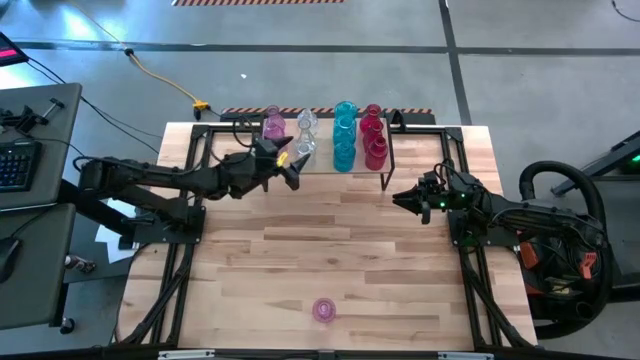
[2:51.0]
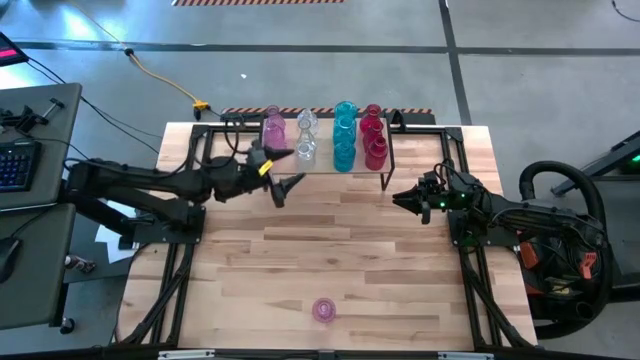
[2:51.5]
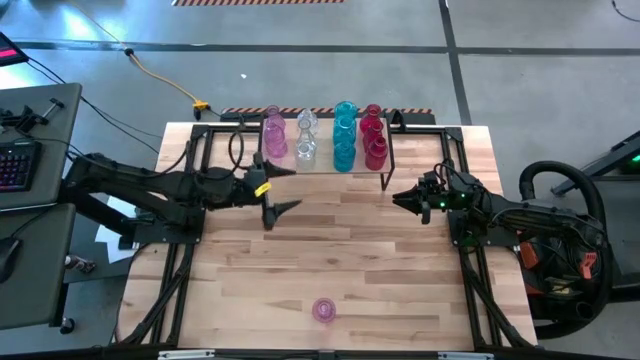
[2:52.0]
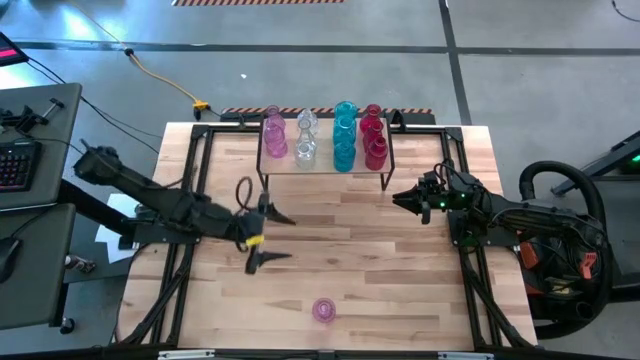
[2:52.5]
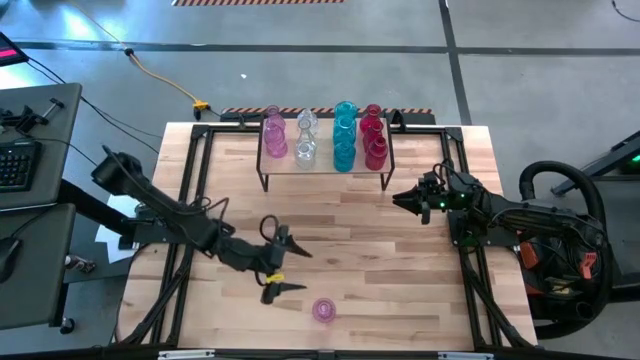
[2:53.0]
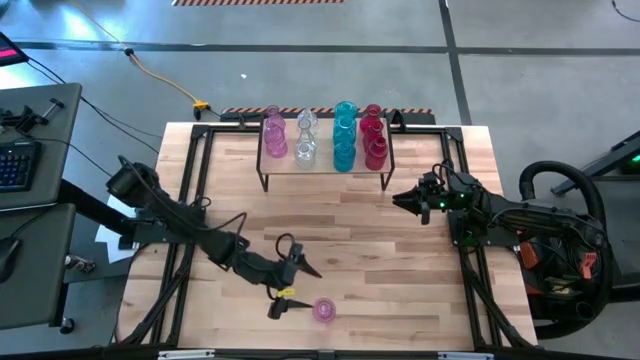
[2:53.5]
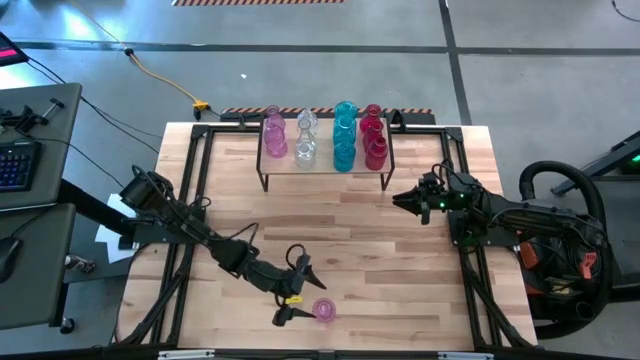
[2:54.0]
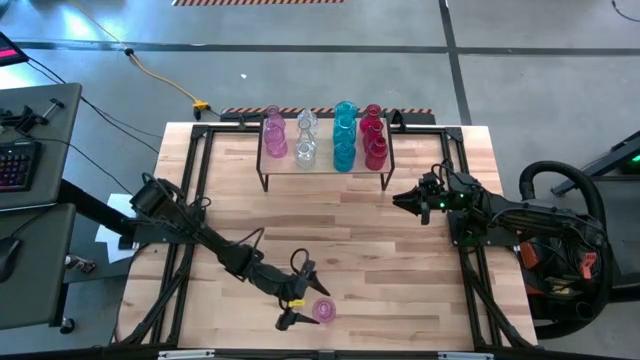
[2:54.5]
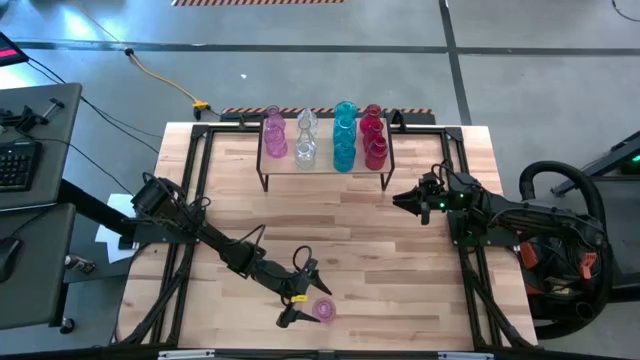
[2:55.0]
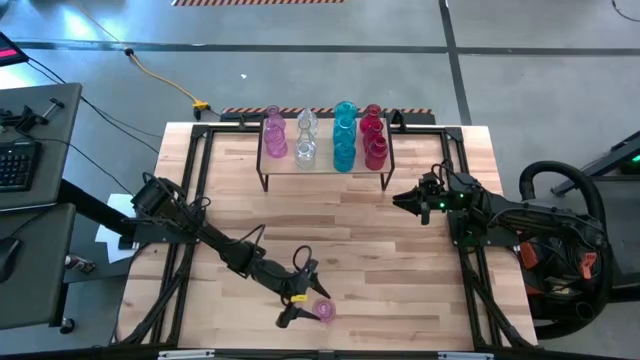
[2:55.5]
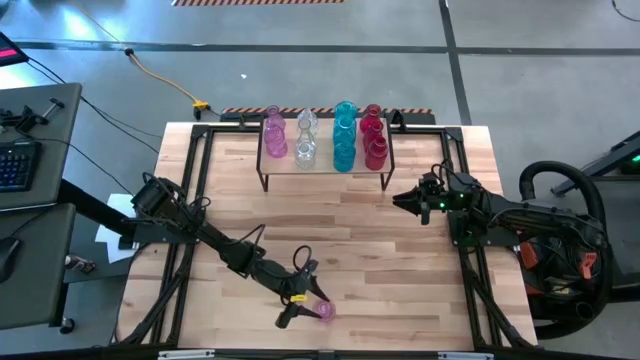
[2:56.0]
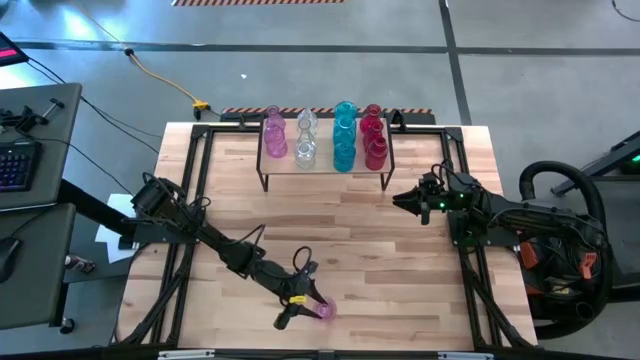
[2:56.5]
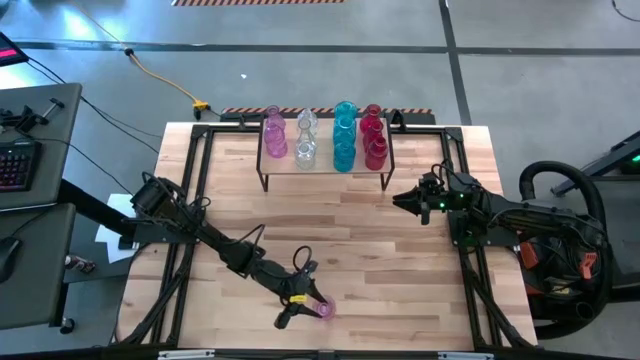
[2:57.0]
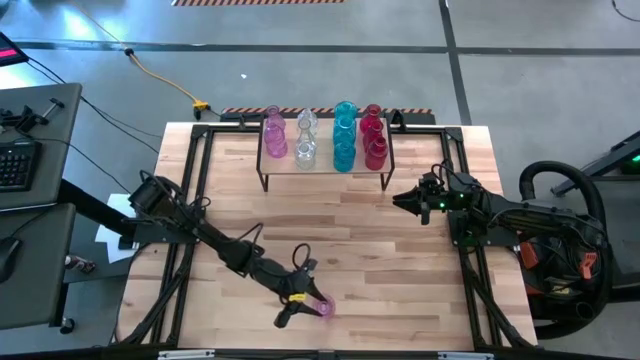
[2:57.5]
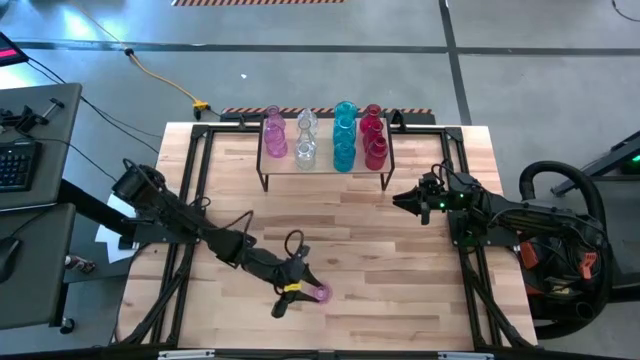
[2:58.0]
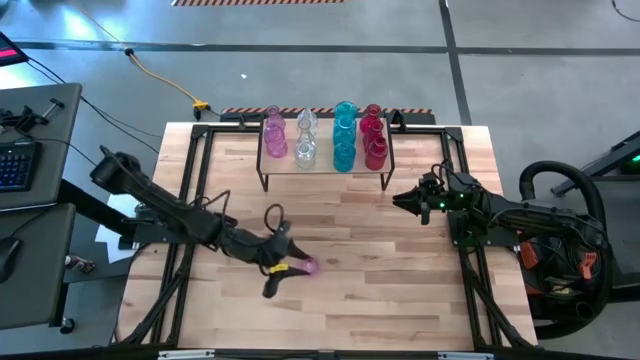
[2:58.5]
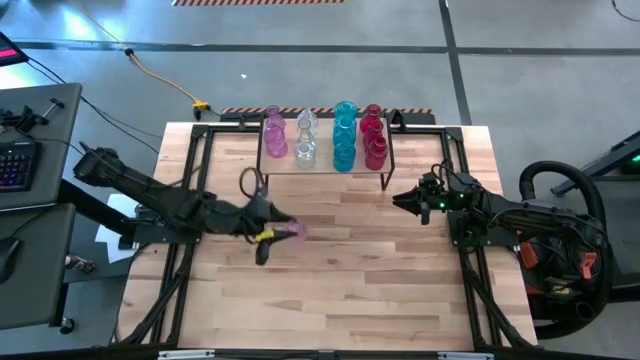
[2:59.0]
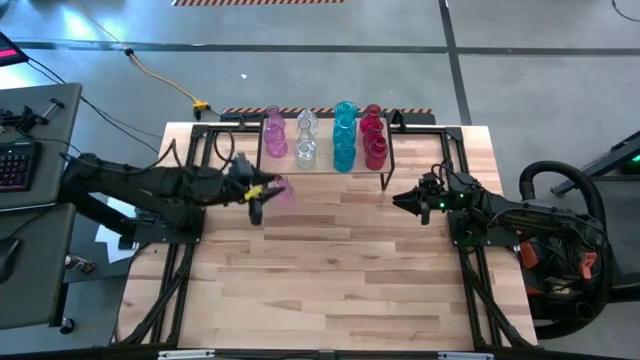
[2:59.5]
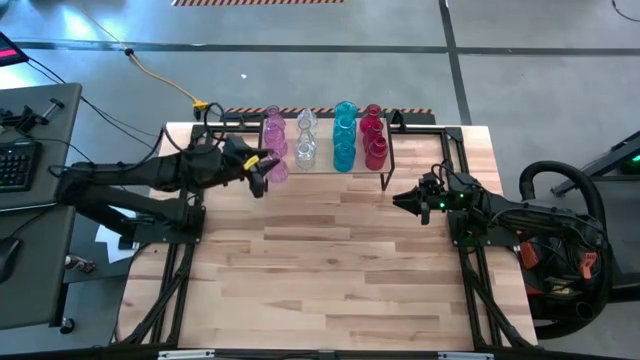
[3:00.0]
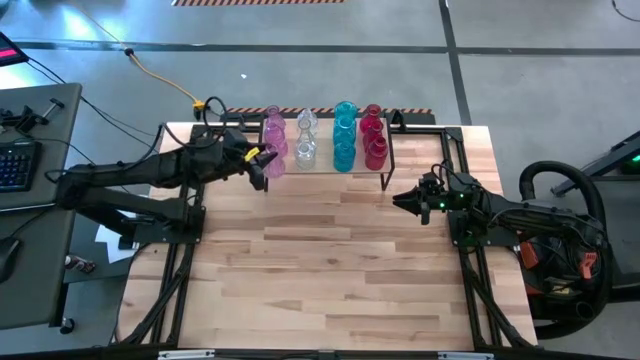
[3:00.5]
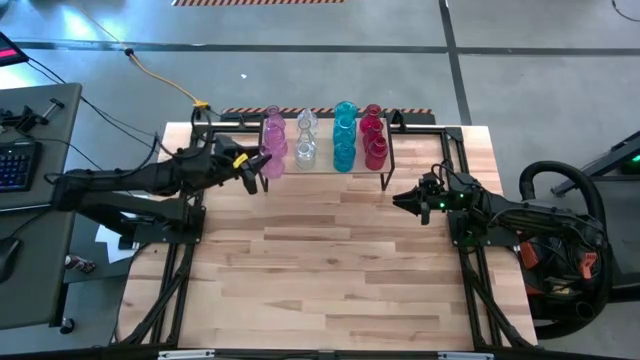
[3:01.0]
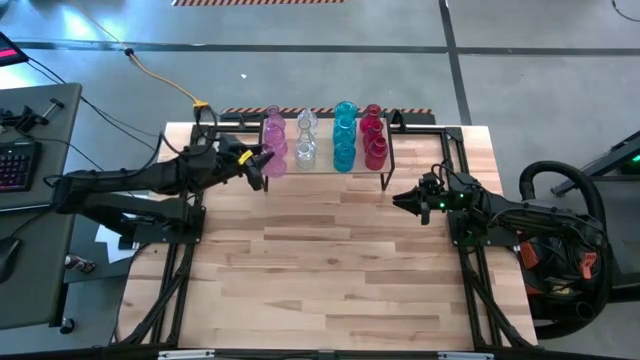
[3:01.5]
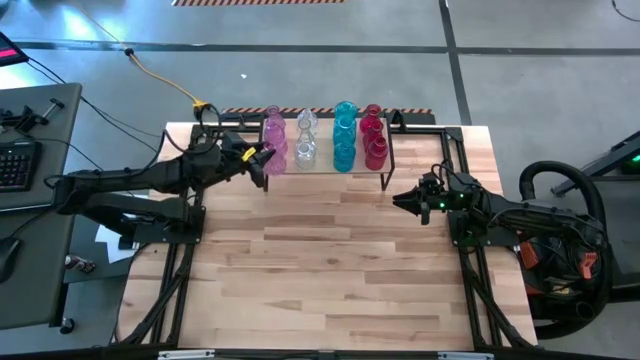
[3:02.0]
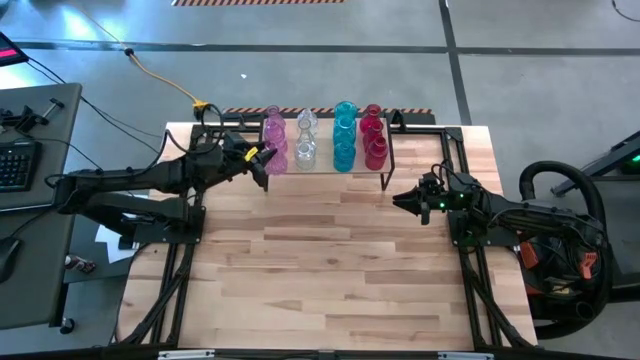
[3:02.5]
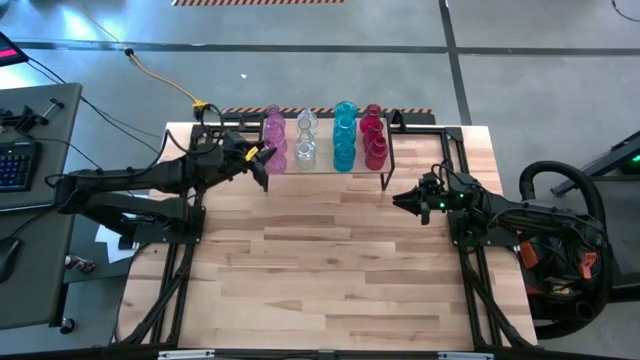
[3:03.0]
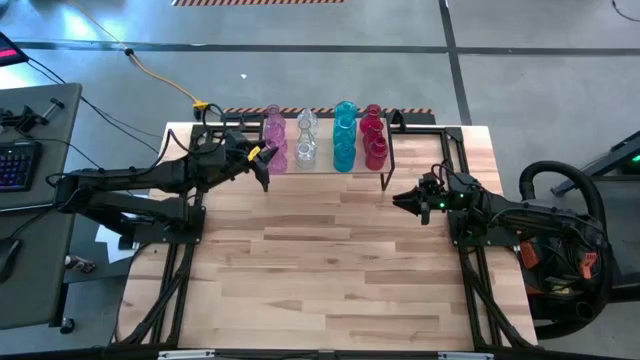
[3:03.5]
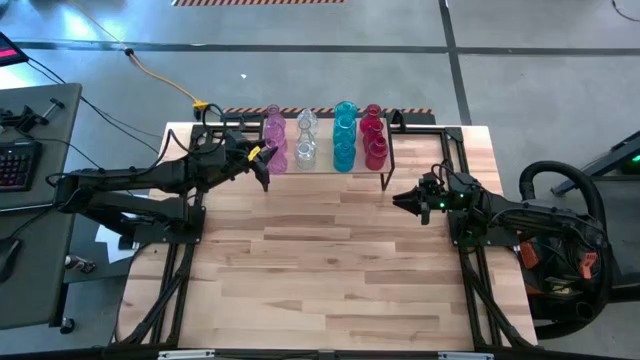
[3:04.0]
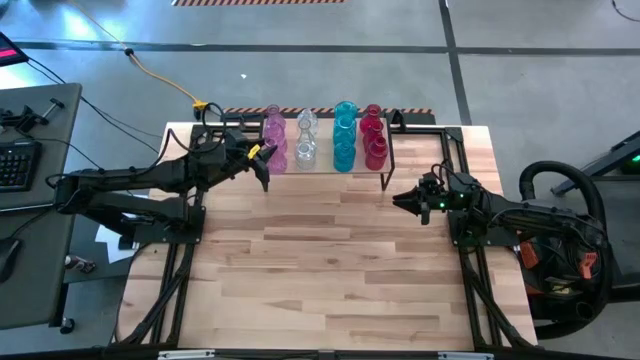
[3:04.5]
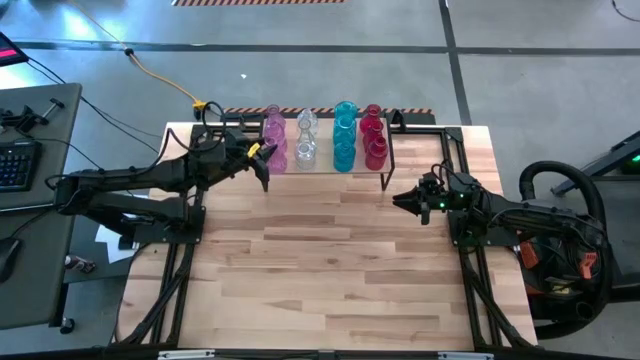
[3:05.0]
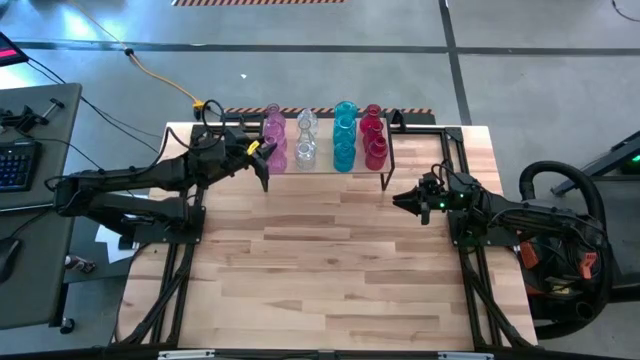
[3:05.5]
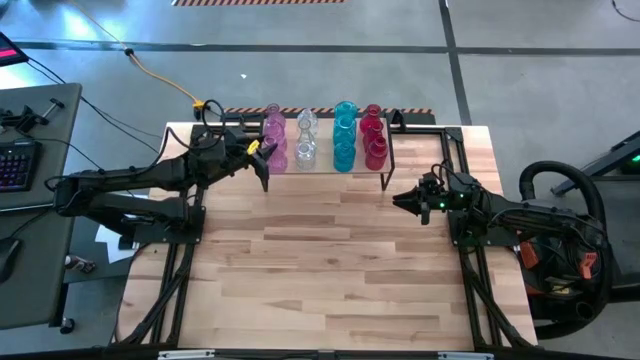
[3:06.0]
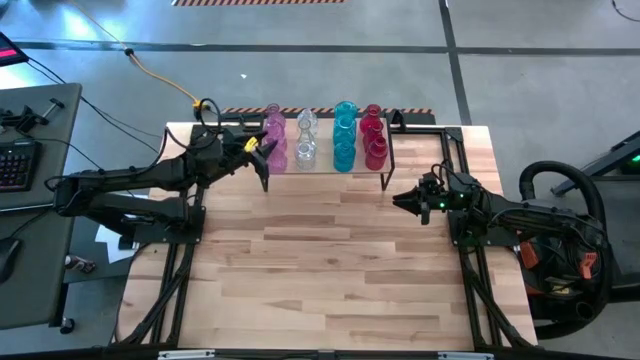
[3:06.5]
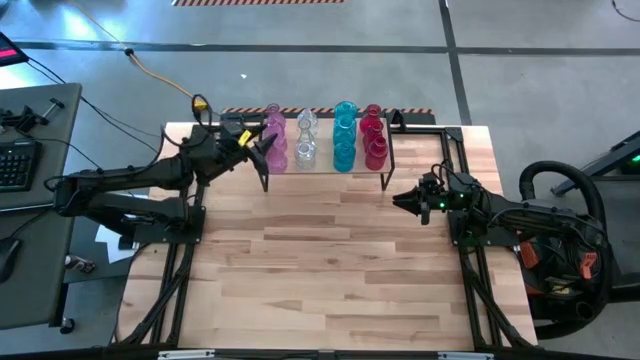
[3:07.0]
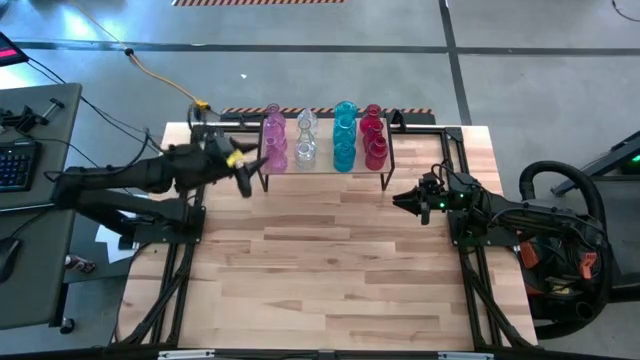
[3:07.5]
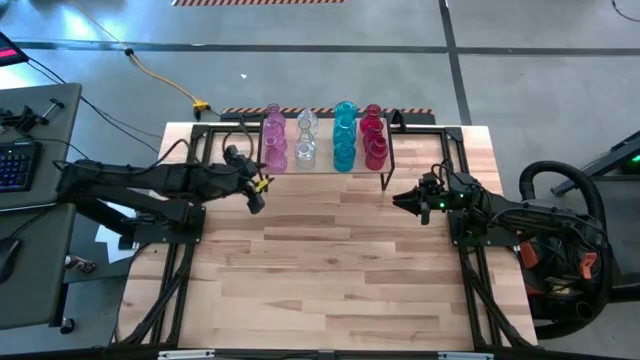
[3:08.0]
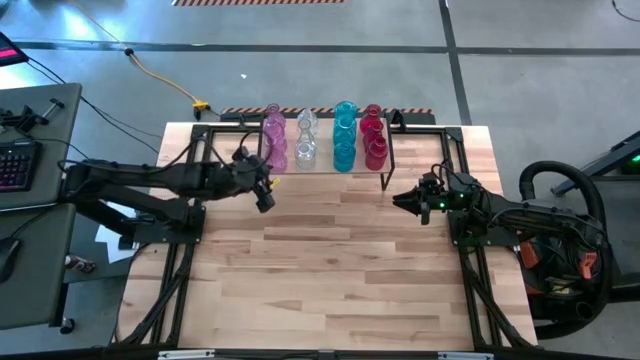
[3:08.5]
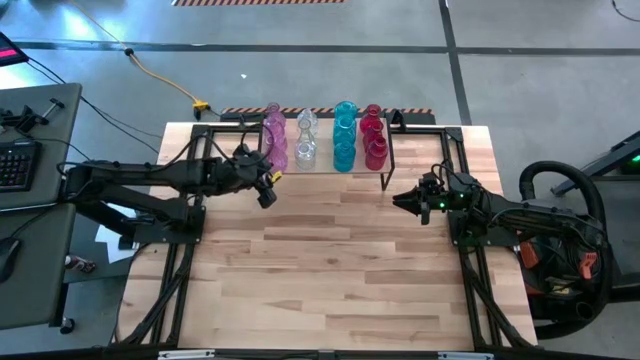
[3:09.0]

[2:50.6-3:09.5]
Task: sort vases onto shelf
Put the light violet vase on the shelf aligned with the other light violet vases

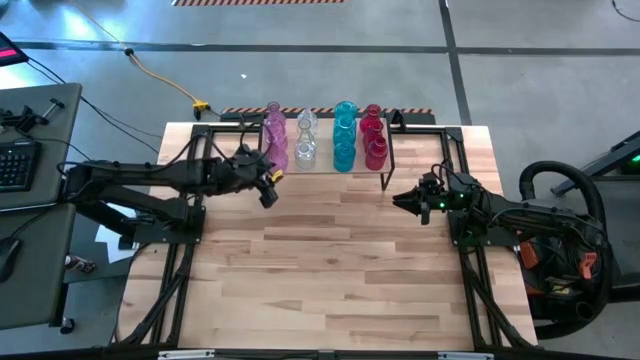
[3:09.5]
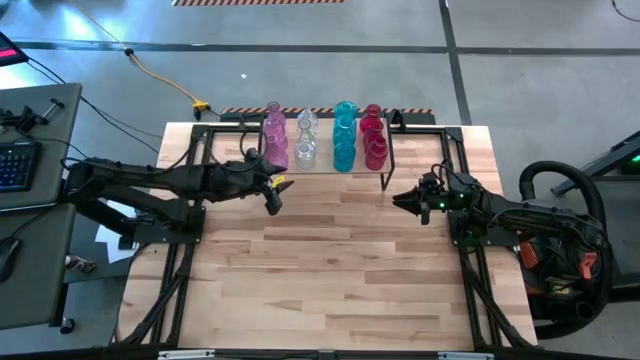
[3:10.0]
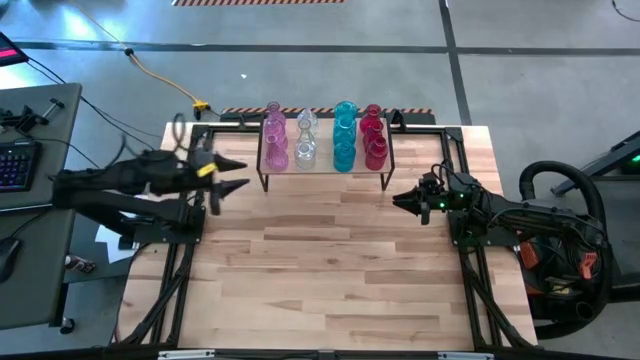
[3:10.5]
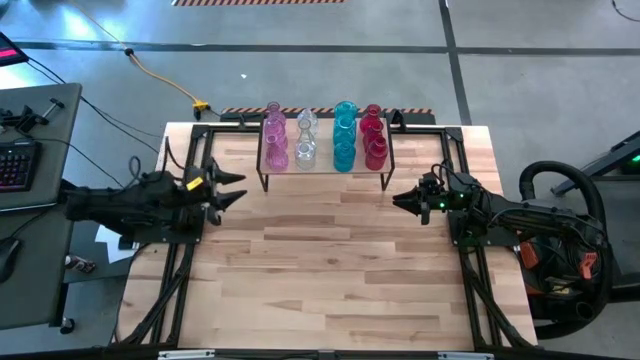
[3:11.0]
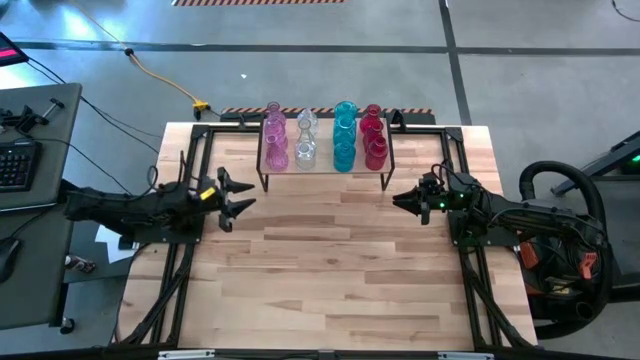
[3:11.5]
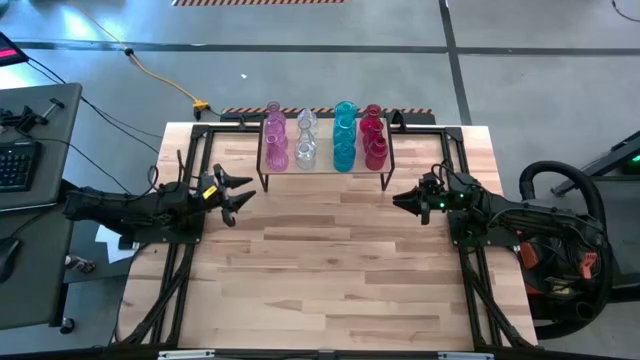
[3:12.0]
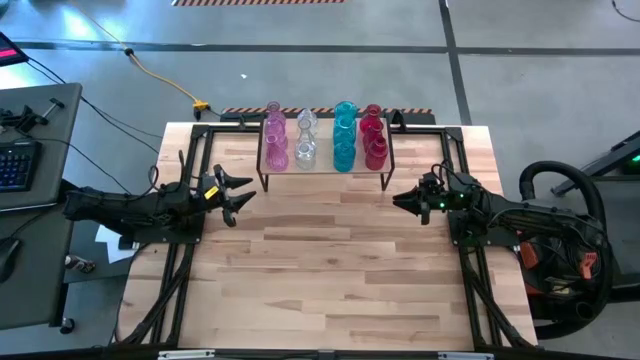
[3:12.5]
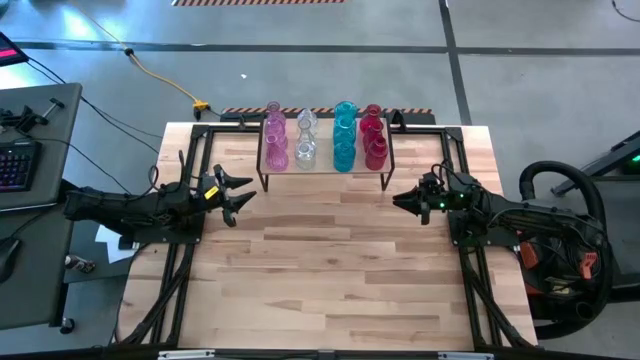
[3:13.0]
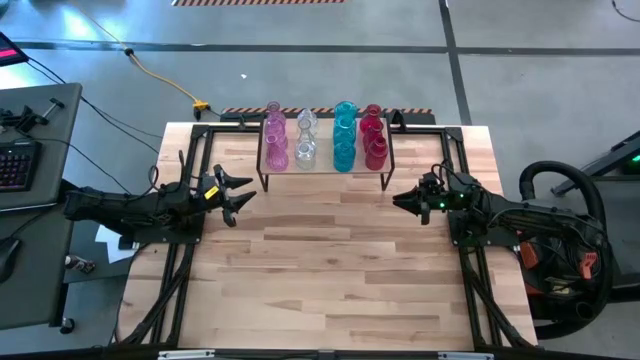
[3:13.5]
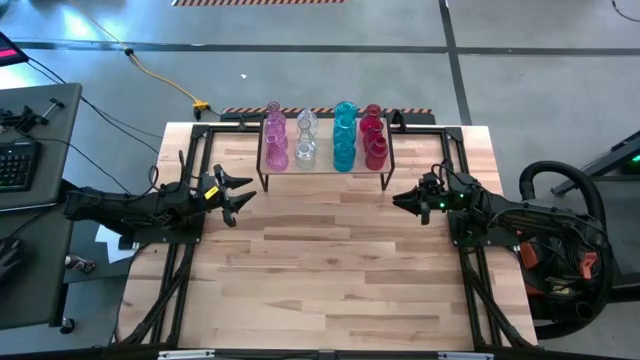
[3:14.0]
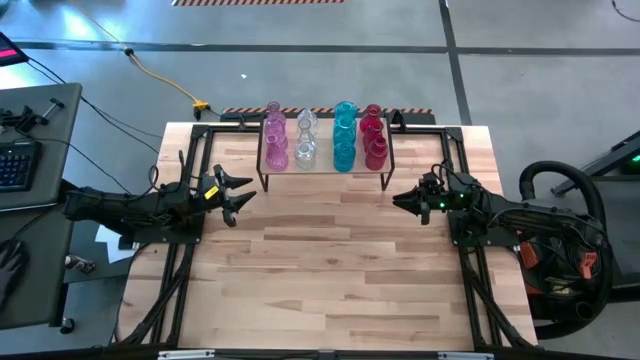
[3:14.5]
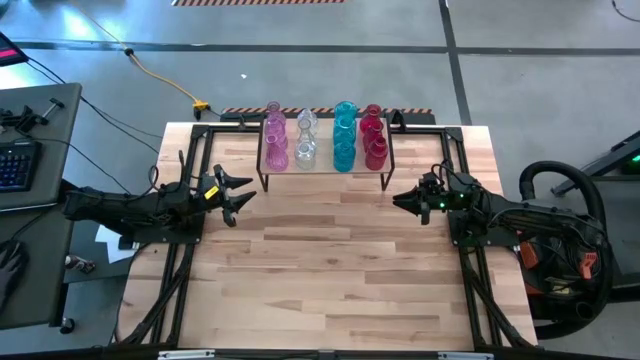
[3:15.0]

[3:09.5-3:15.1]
Return to Home Position
